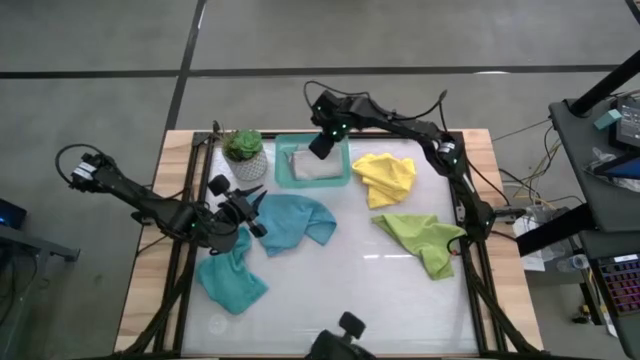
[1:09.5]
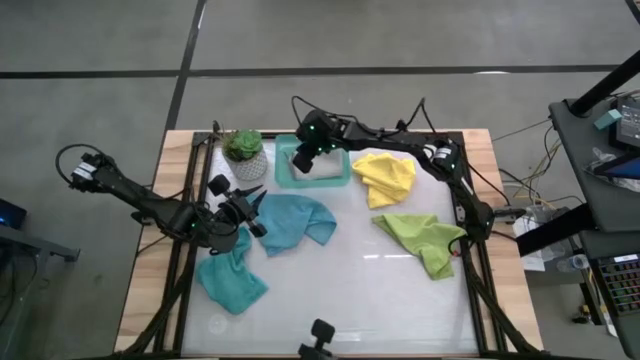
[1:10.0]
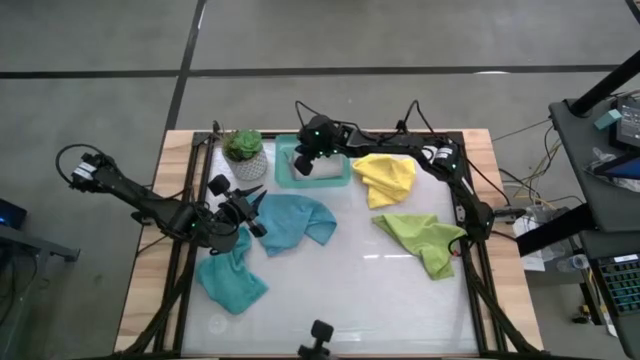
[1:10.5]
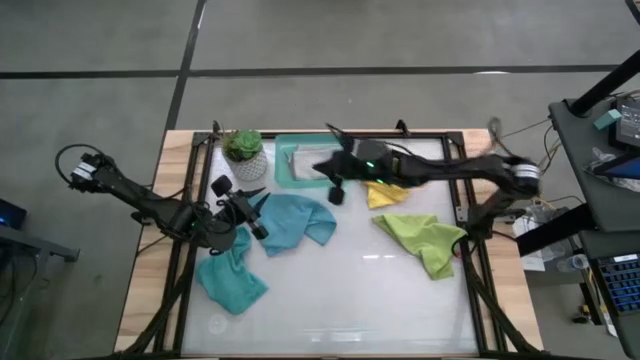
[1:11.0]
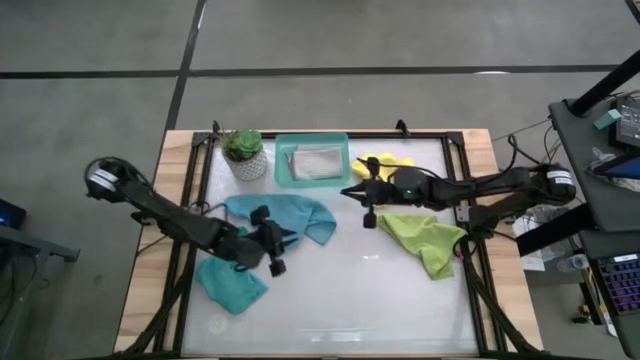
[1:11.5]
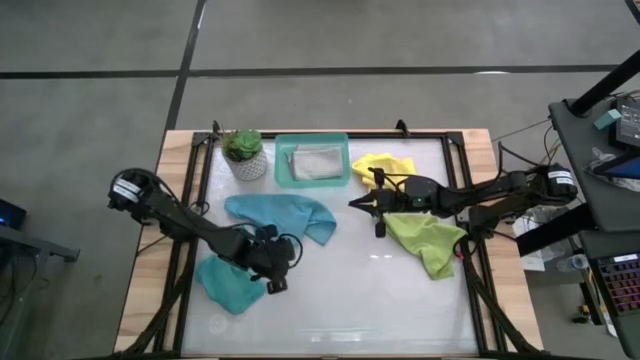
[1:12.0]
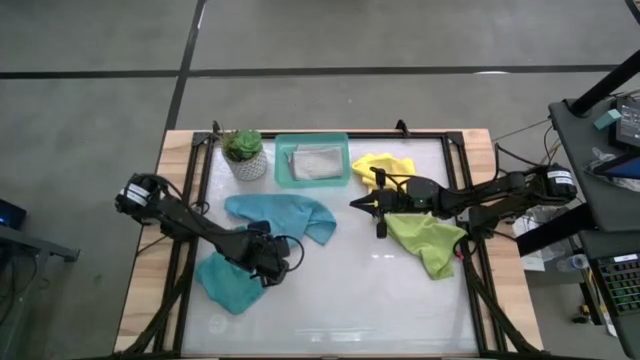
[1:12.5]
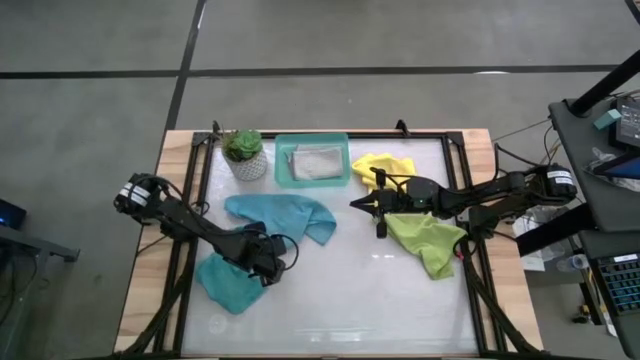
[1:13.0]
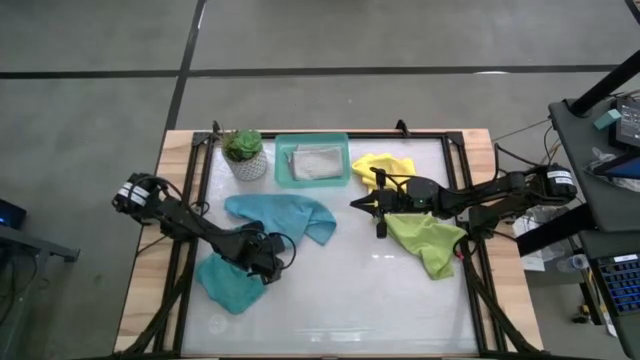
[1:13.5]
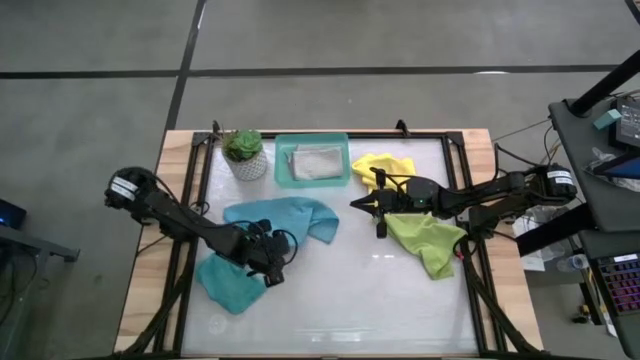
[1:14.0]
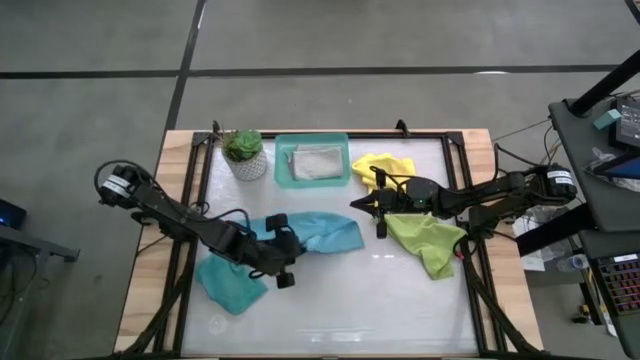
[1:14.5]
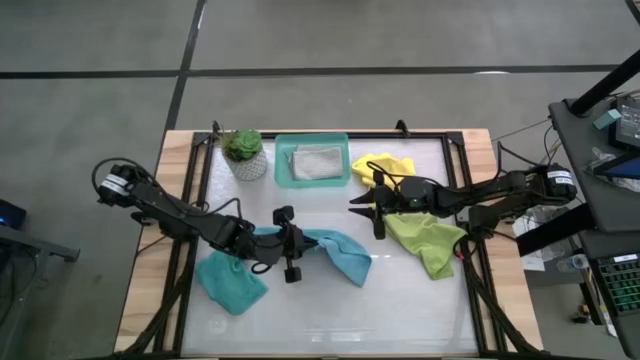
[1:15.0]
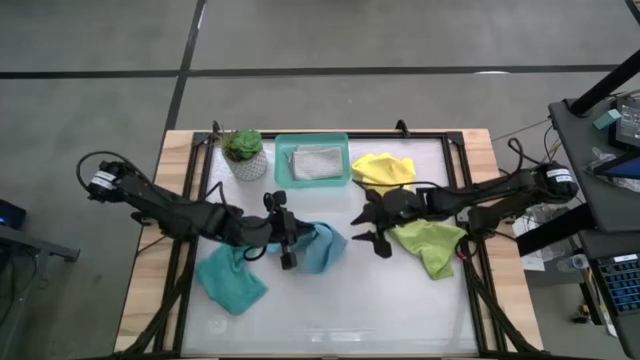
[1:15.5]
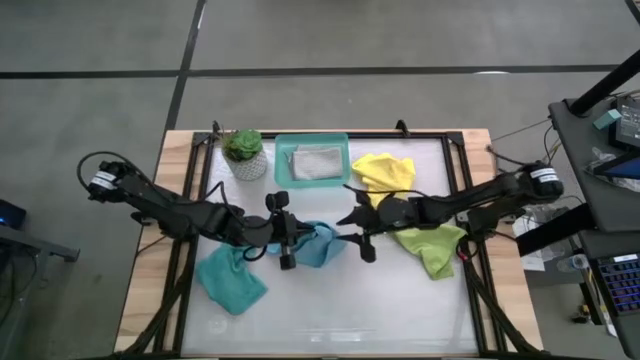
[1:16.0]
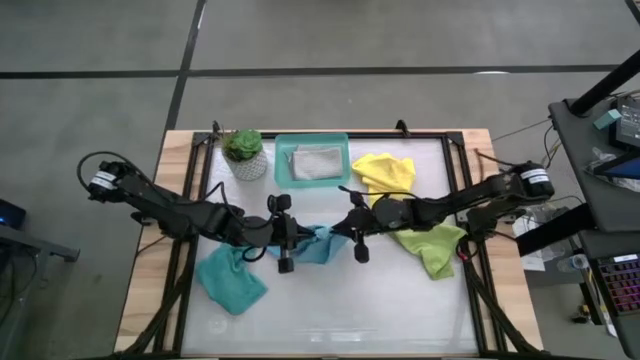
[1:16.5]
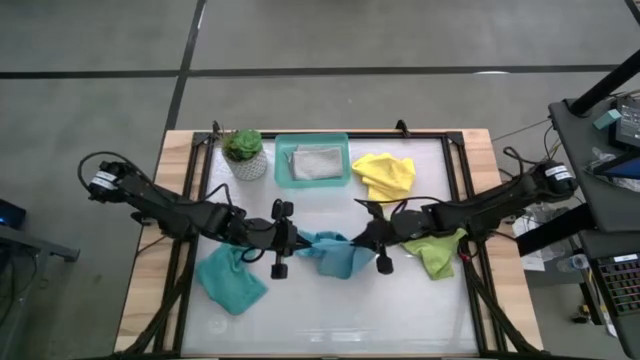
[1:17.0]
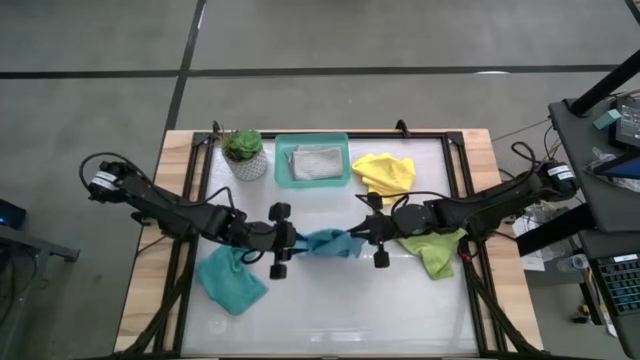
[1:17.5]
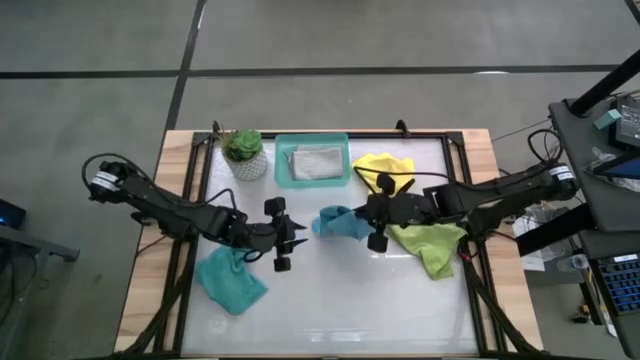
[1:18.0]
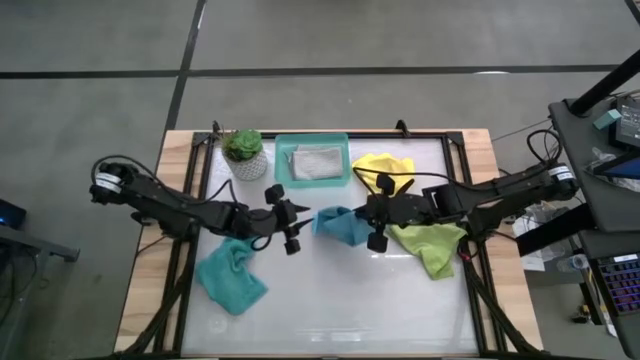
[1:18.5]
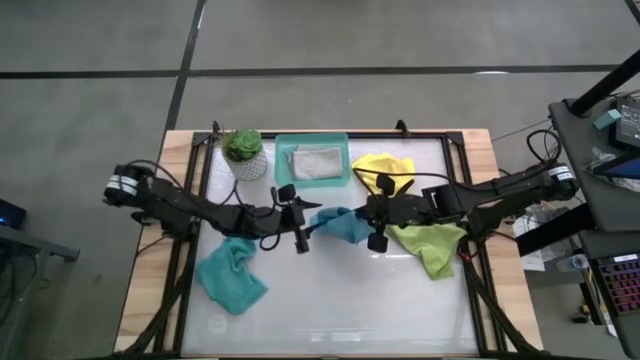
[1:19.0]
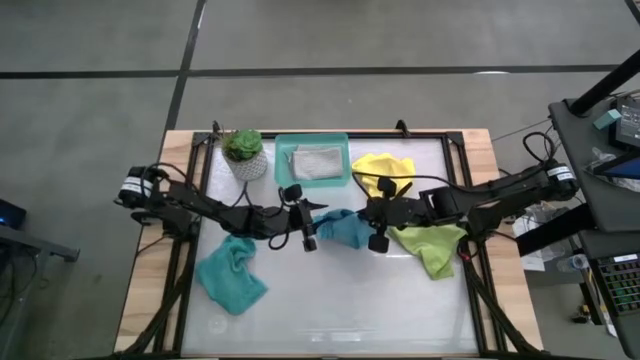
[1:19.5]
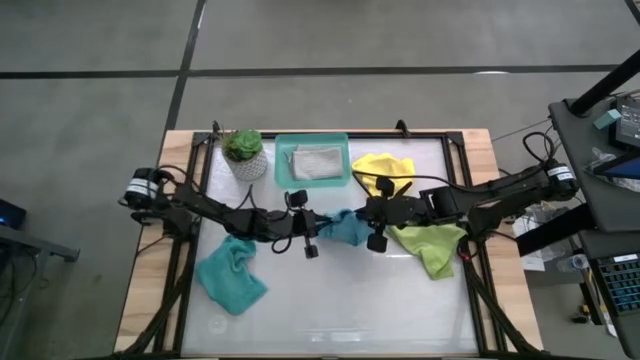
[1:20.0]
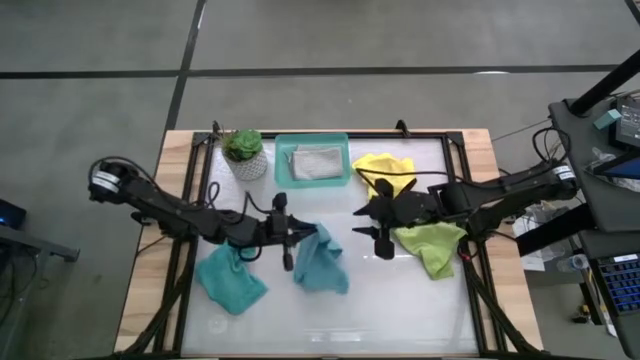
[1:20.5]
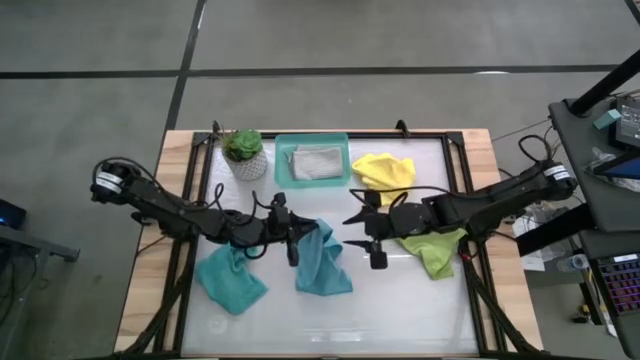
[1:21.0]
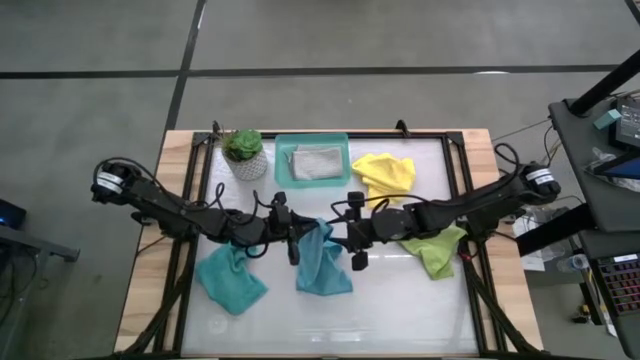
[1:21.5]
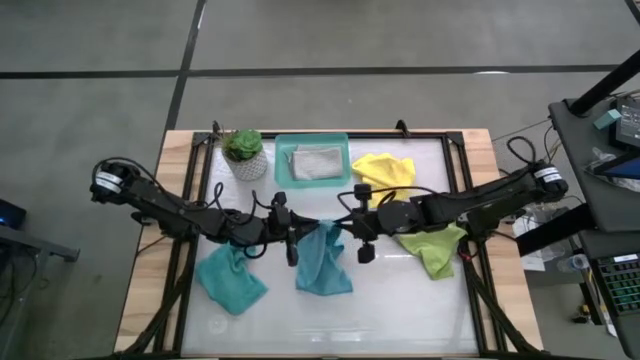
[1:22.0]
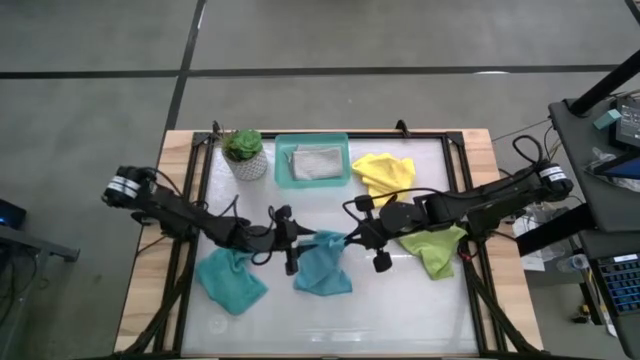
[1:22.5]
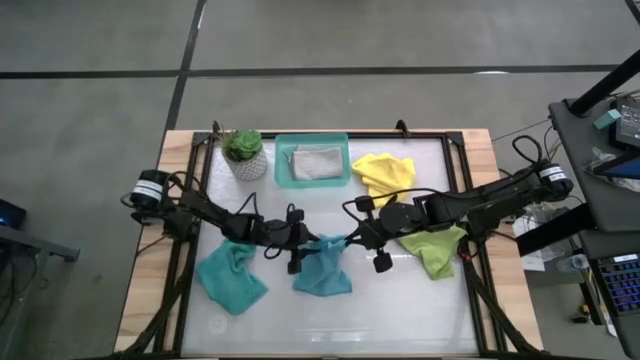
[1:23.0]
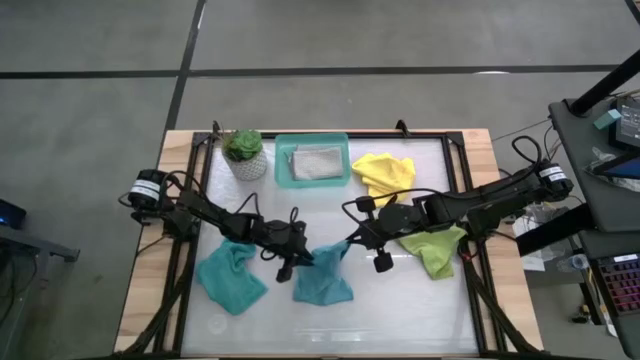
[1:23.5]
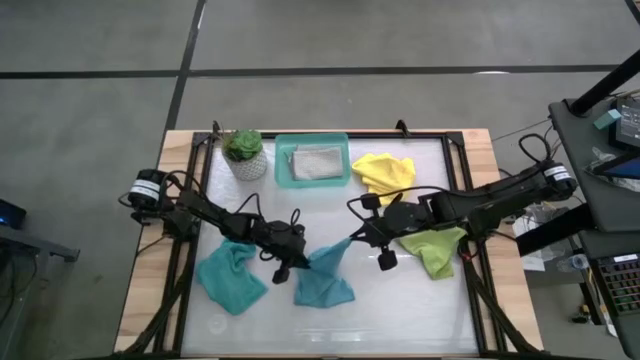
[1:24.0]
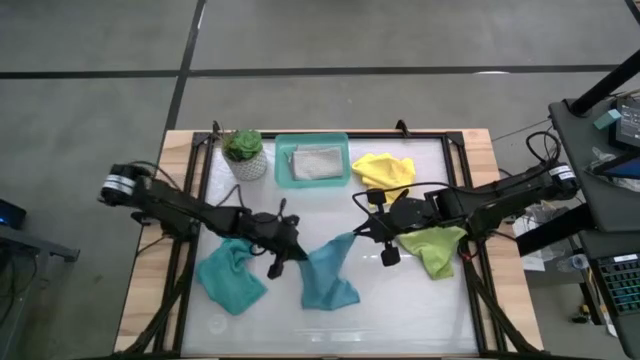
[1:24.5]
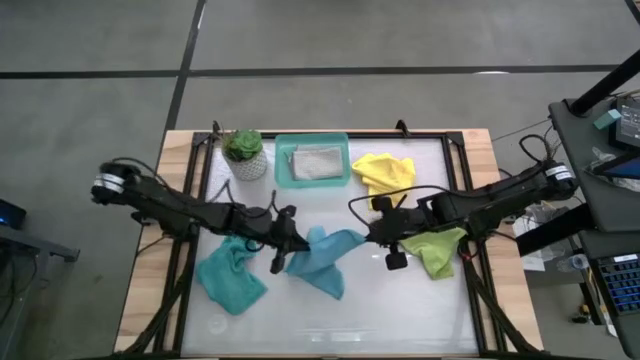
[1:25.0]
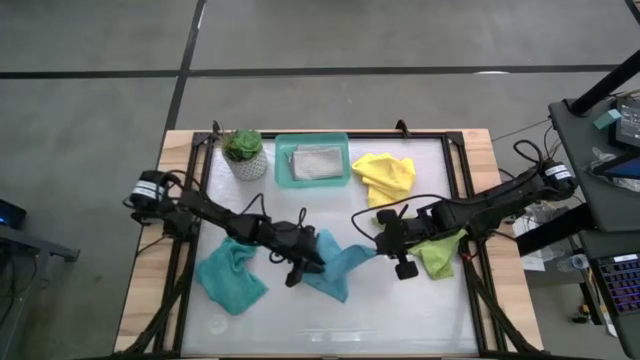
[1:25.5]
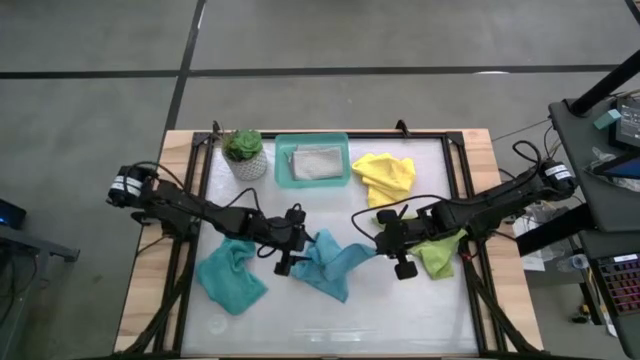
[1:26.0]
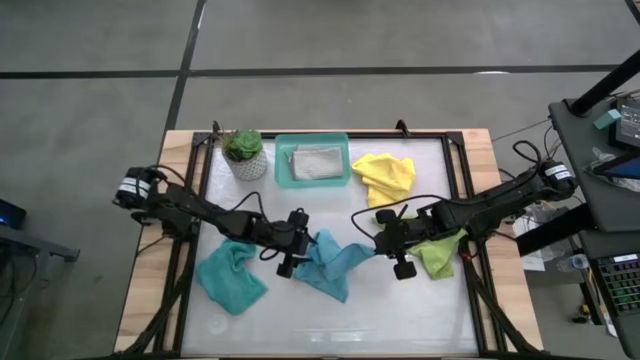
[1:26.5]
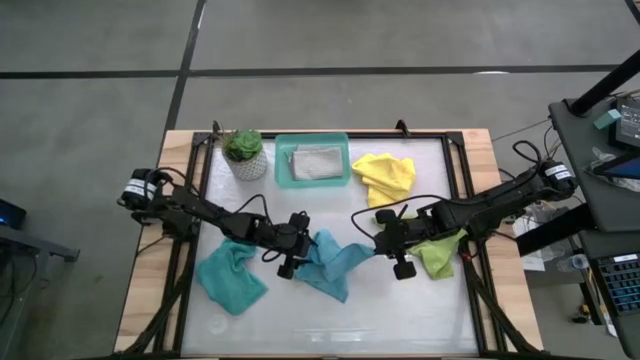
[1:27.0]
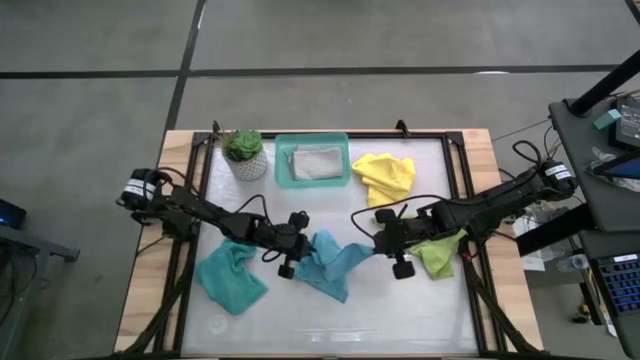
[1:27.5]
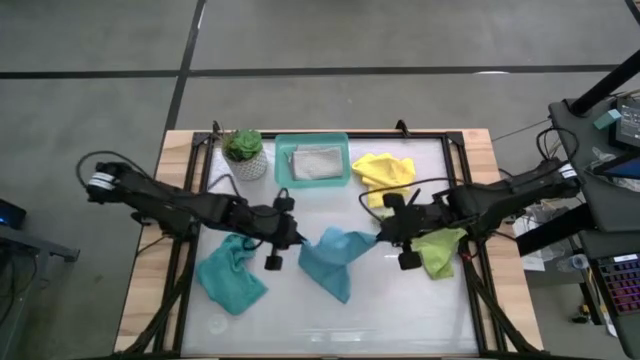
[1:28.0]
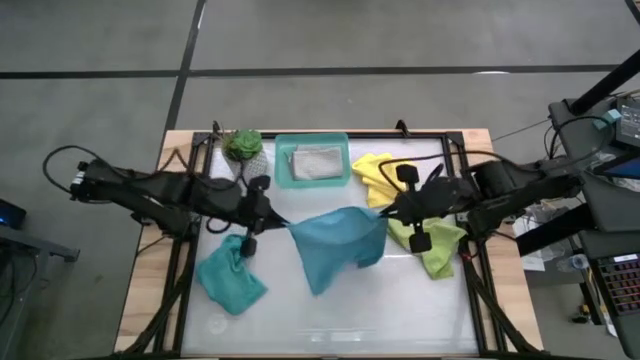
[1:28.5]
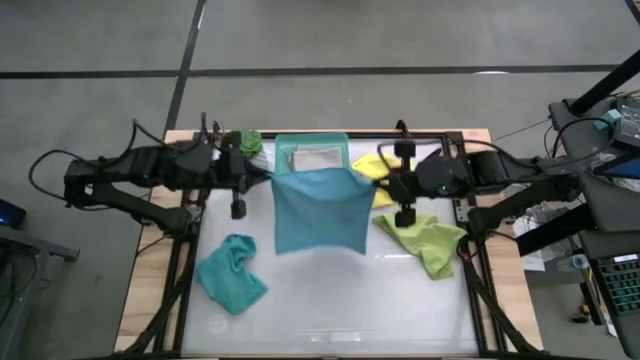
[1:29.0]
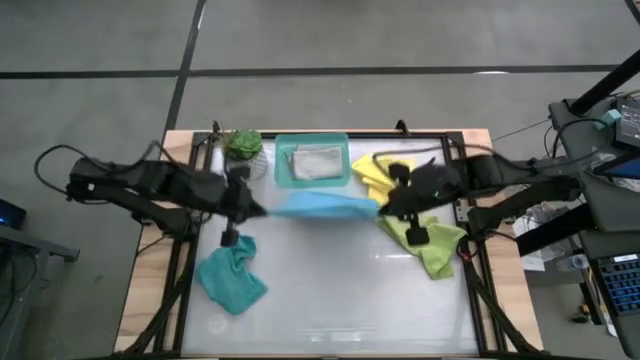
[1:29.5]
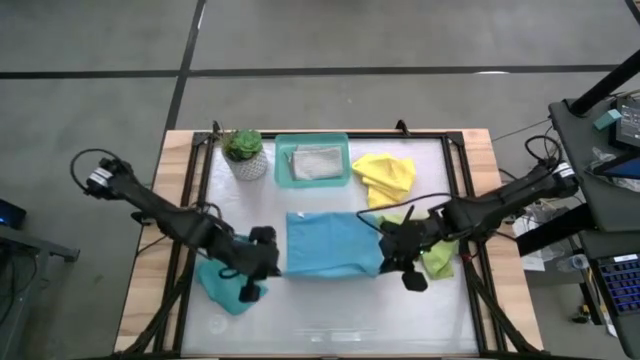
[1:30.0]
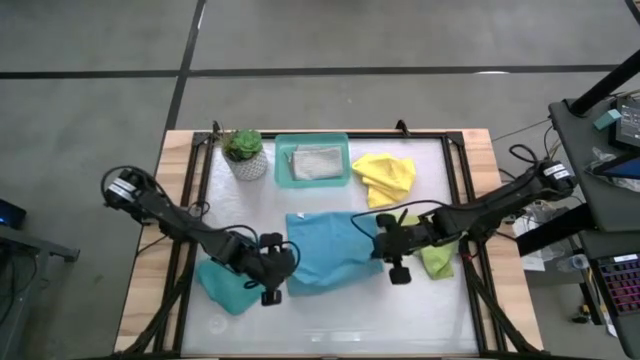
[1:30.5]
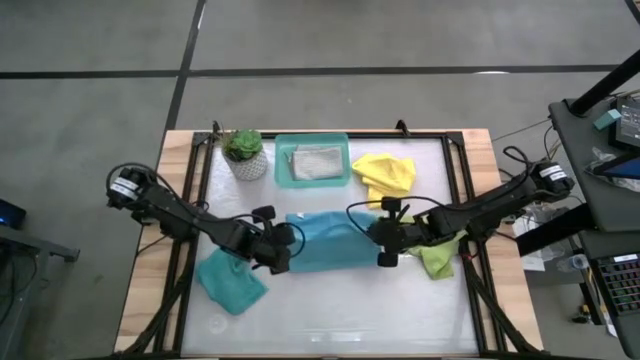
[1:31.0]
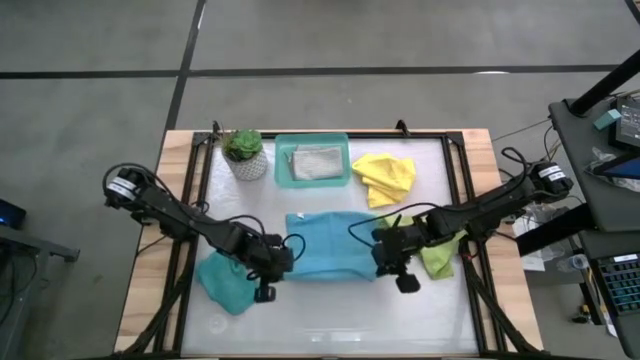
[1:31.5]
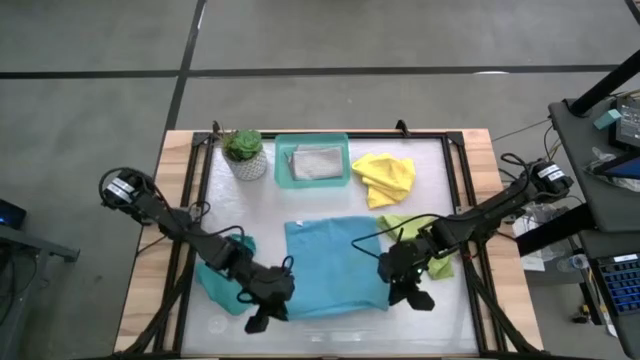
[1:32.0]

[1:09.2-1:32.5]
Task: Fold microfiber towels
Fold the blue microfiber cloth

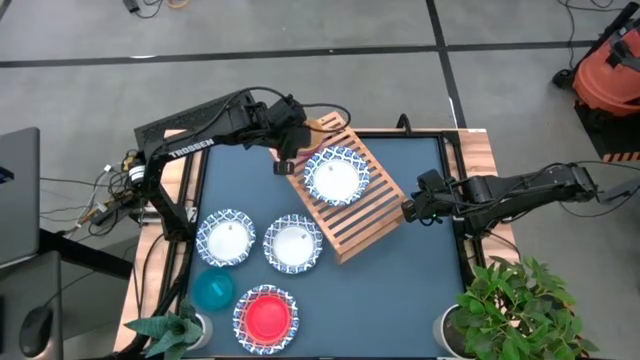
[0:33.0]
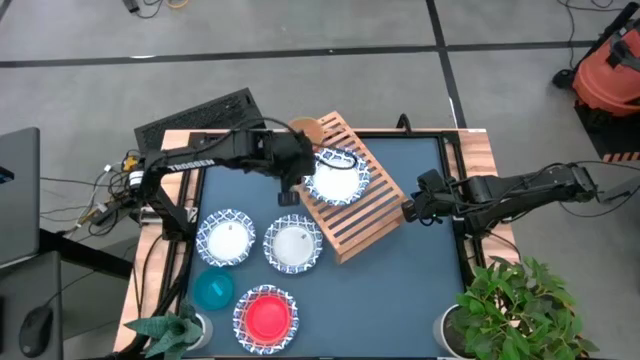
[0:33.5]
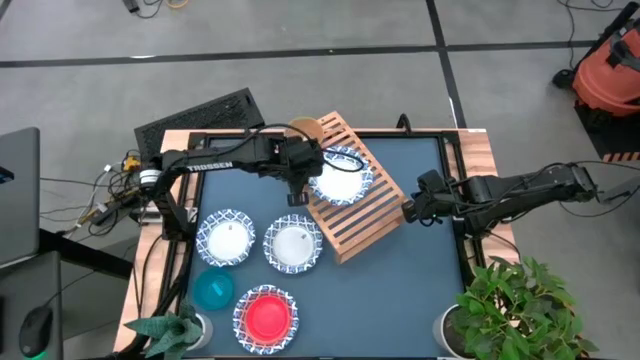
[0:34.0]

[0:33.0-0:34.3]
Task: Place and stack bowls onto a shelf
Adjust the white bowl on the shelf
